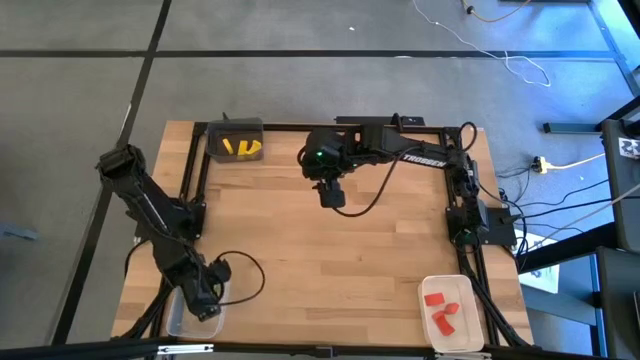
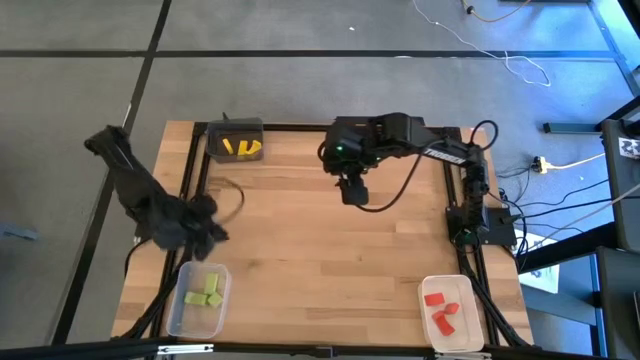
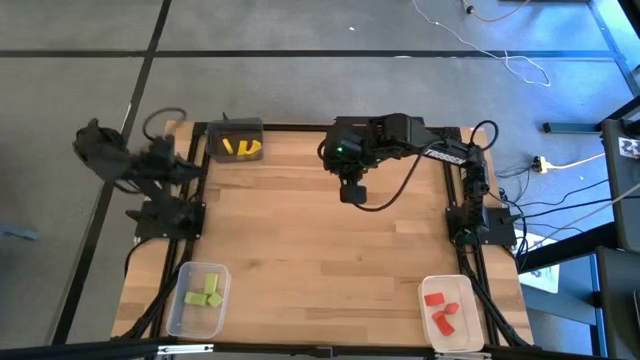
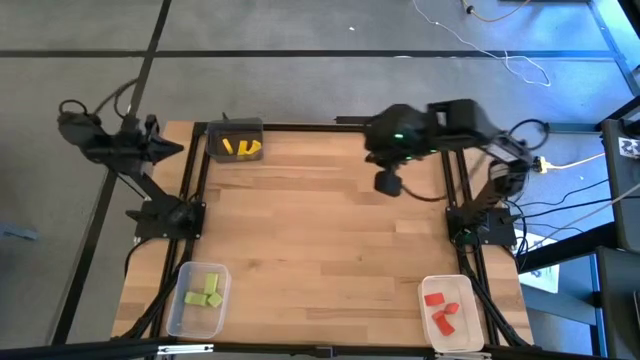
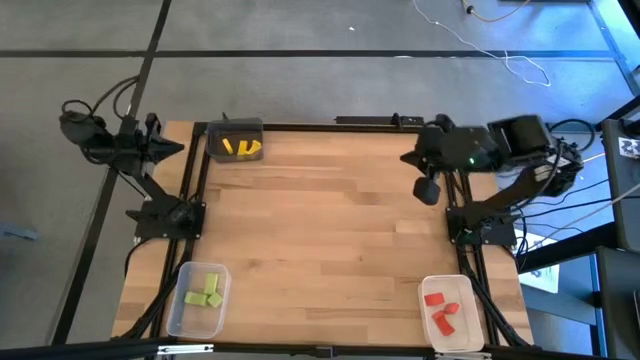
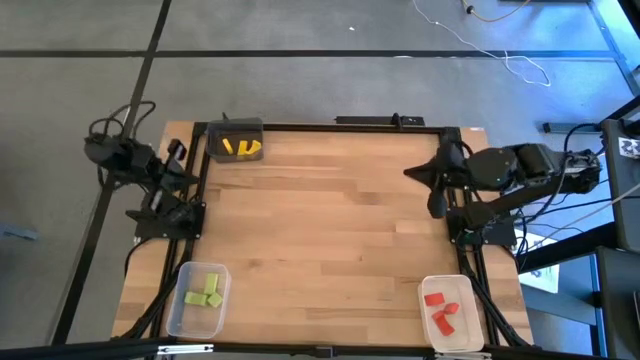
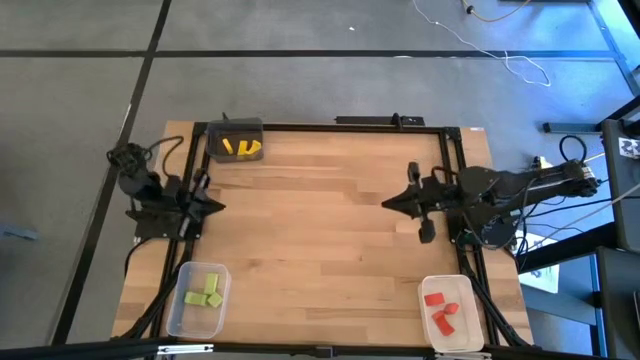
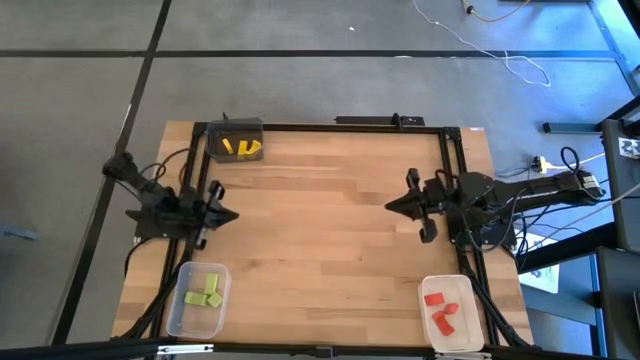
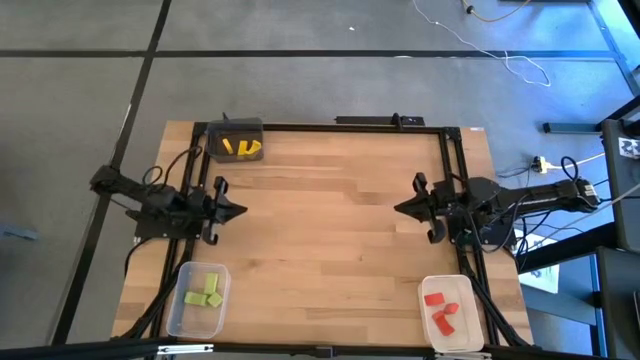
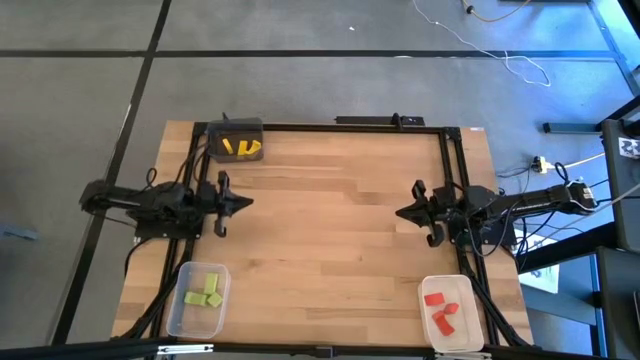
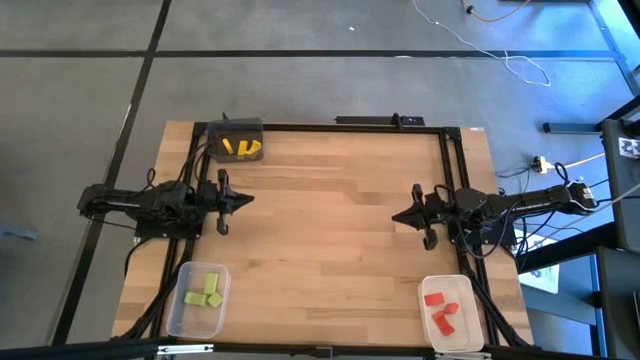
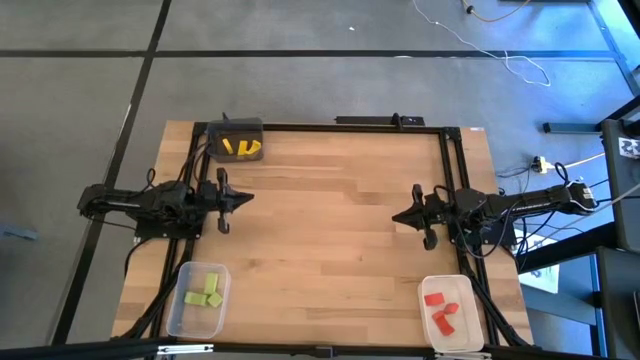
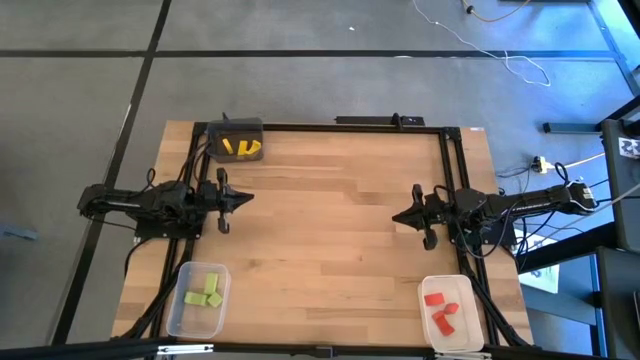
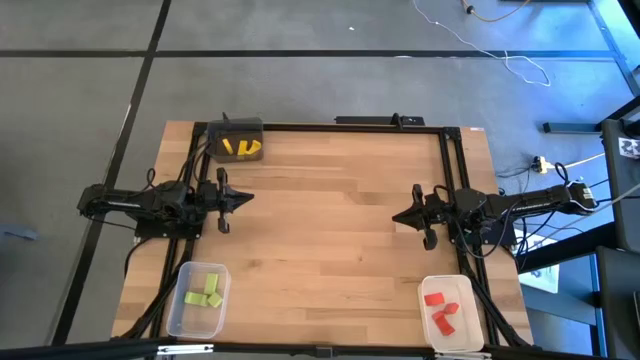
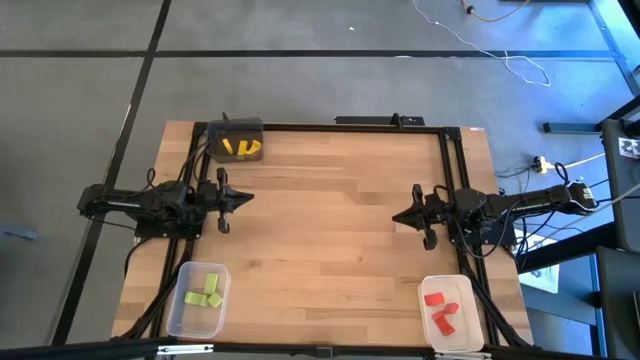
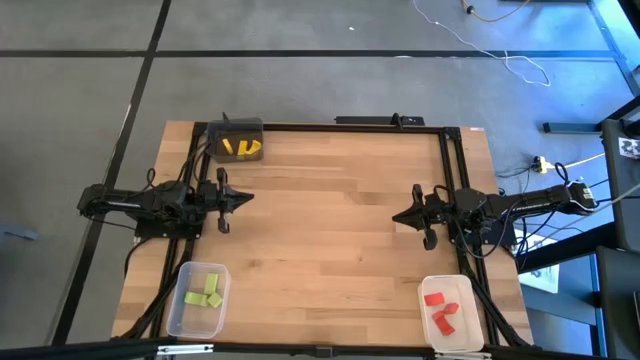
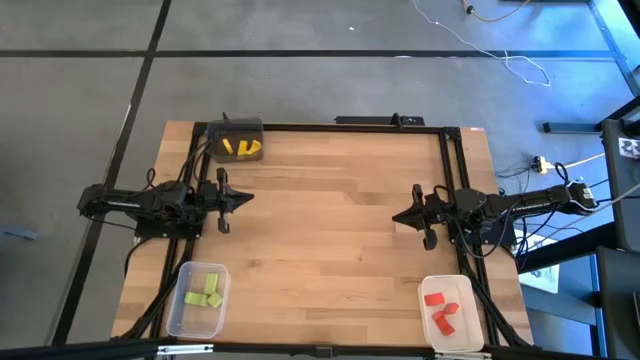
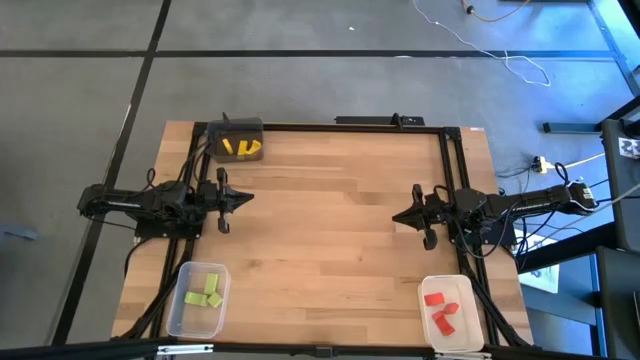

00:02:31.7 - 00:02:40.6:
Task: Sort & place blocks by color
Return to Home Position

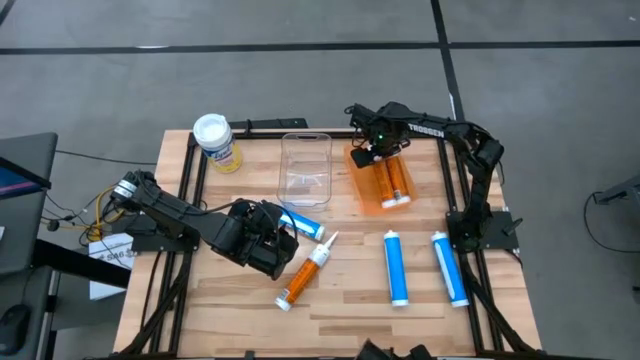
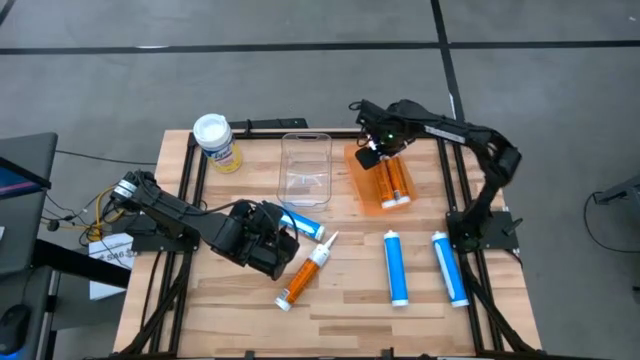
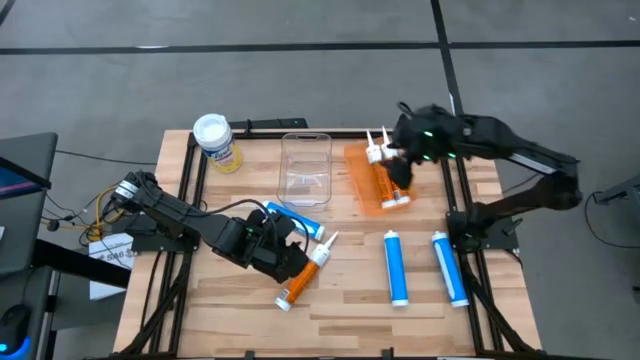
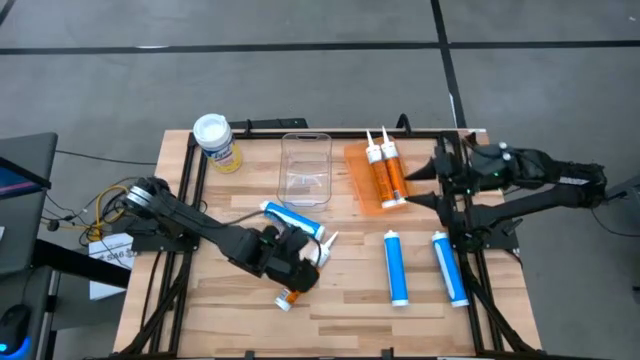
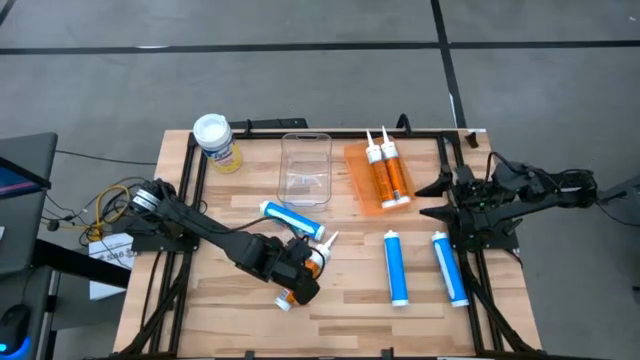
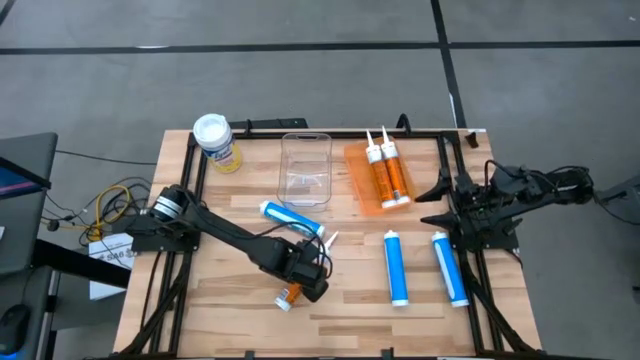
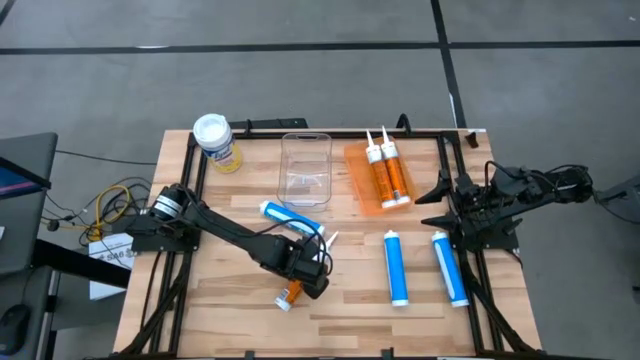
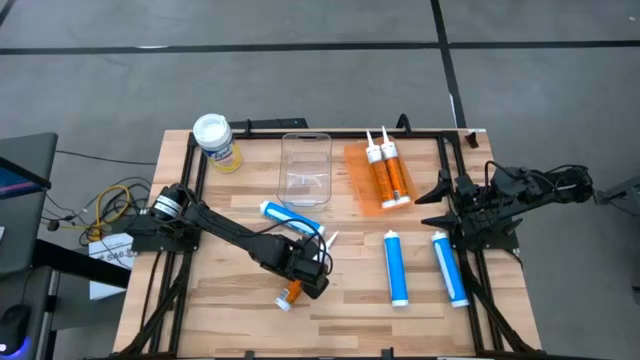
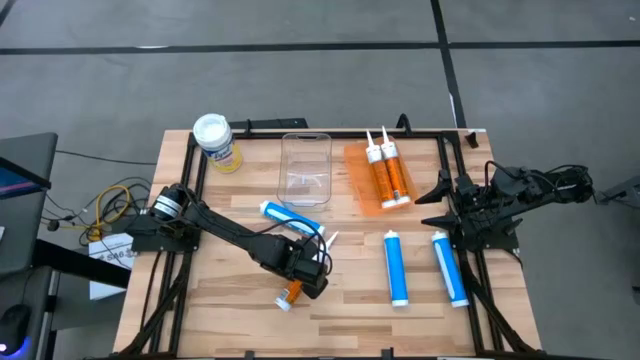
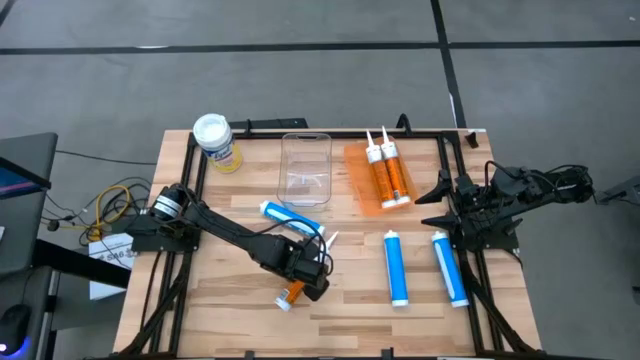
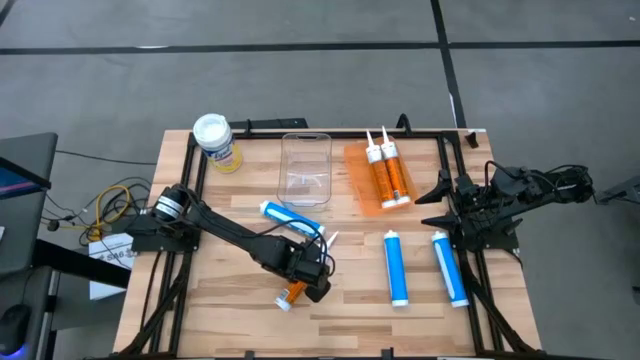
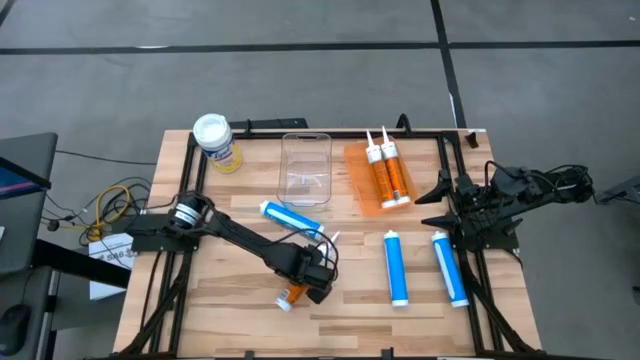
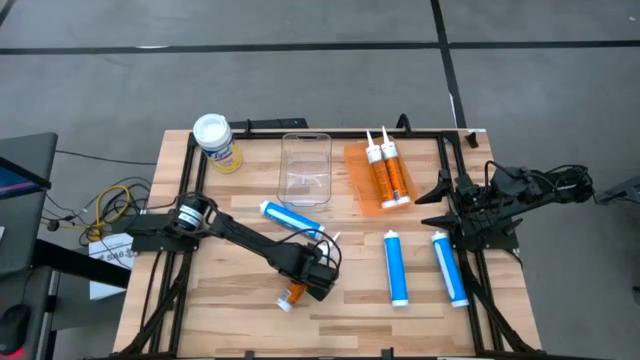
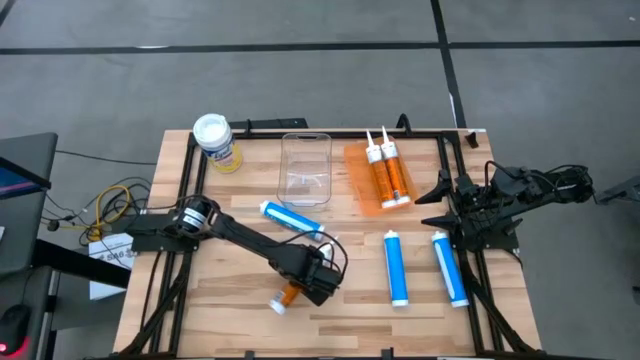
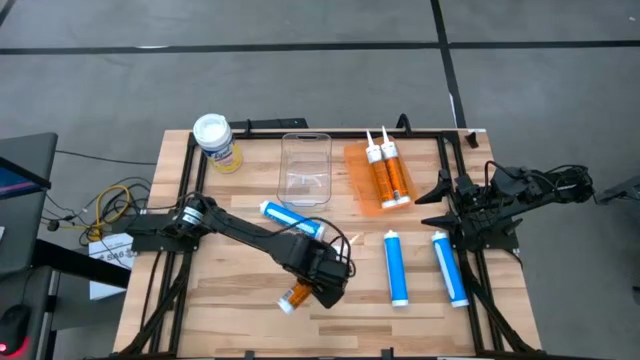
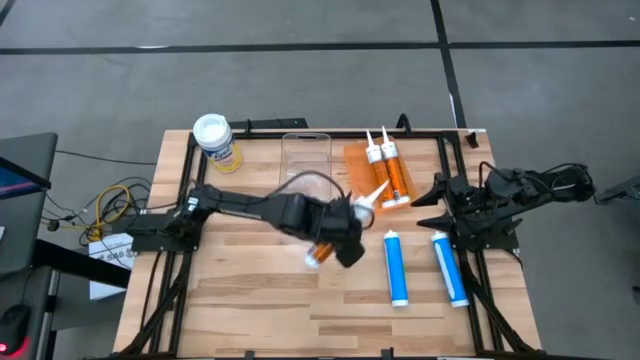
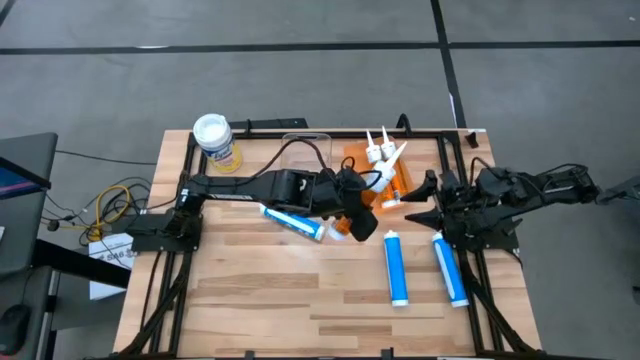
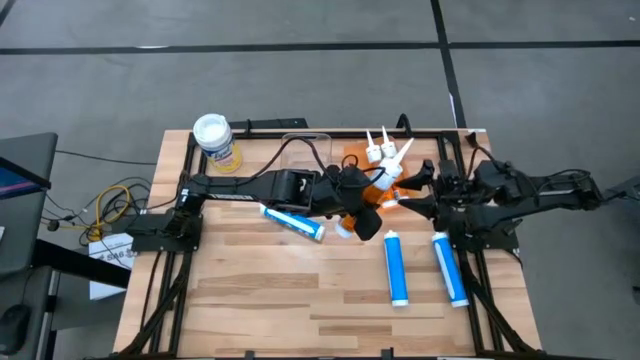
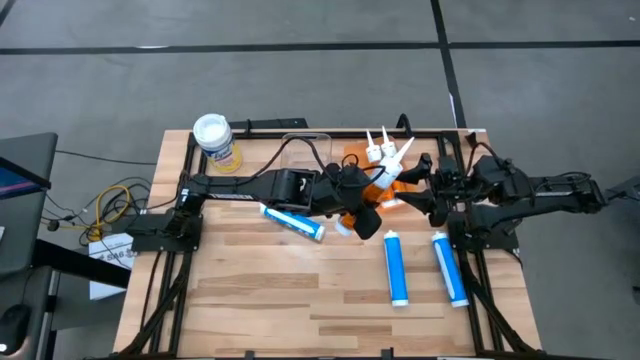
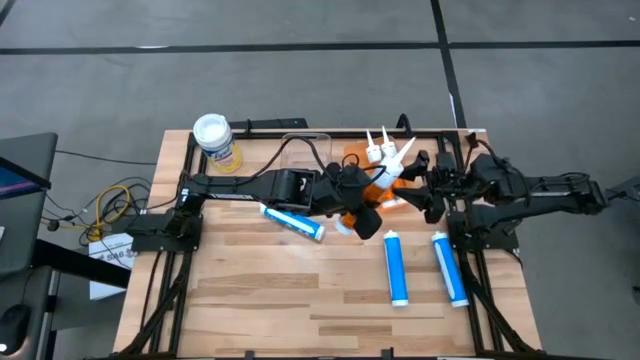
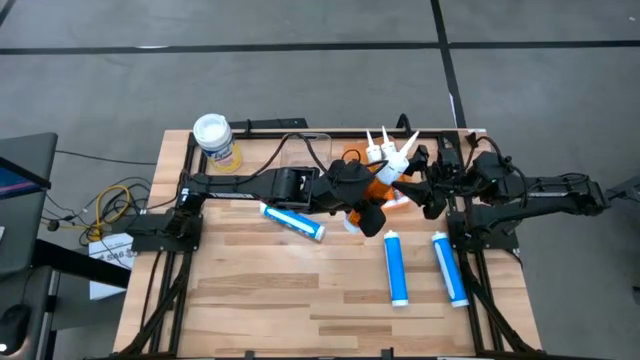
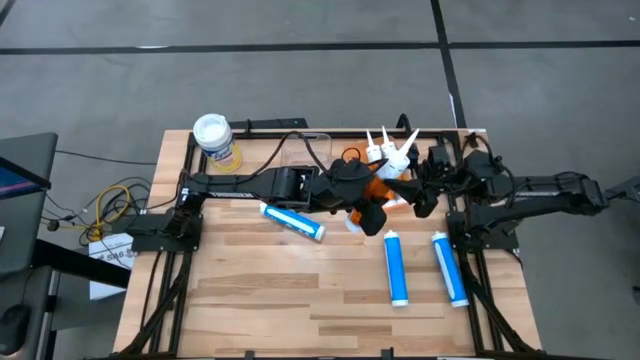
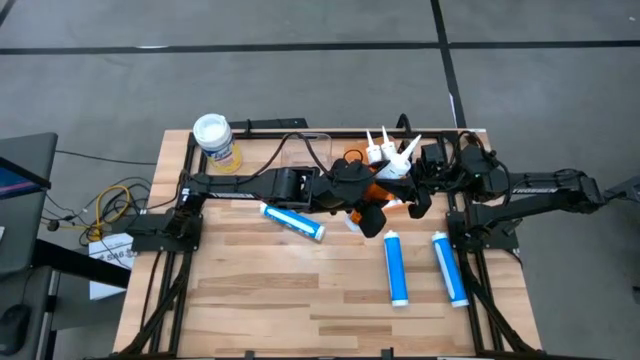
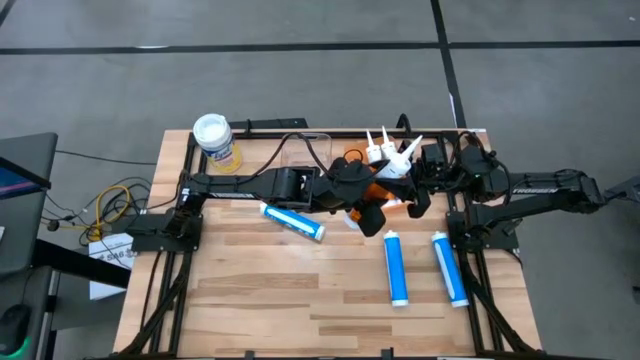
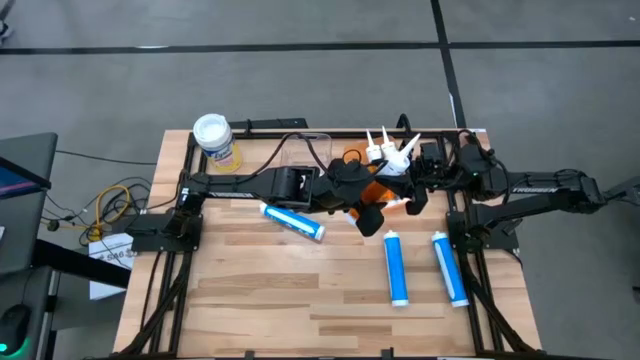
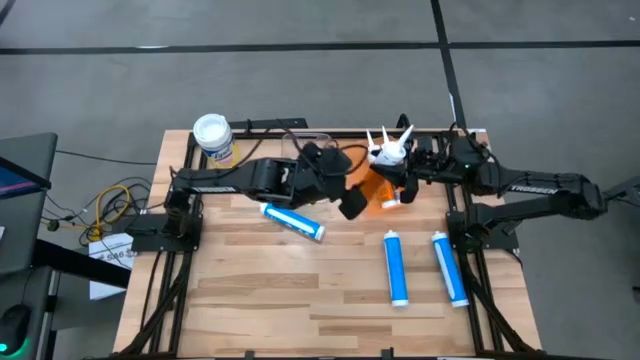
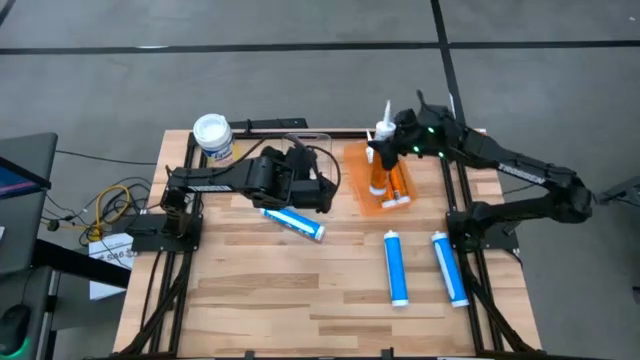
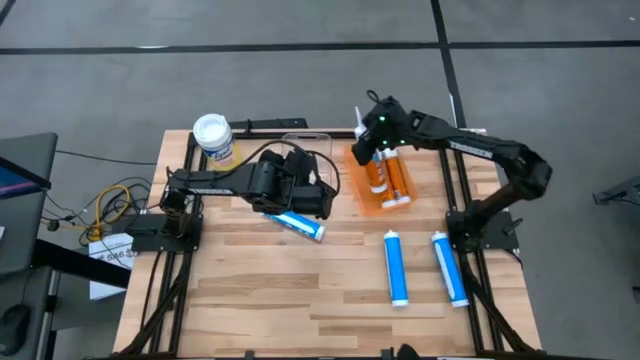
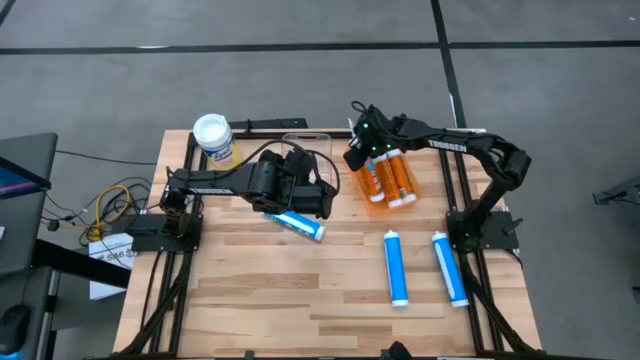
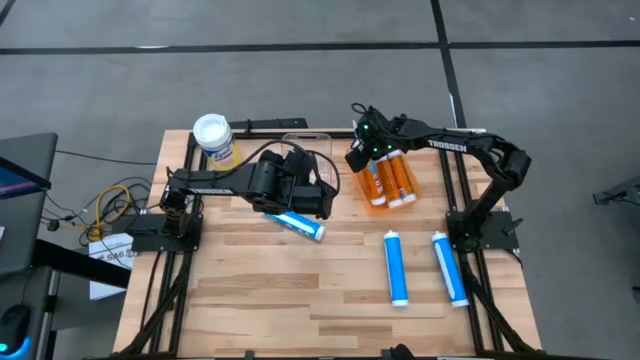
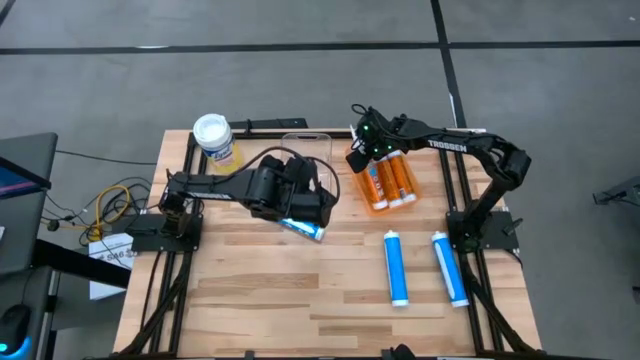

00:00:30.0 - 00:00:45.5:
Task: Pick & place silicon tubes, Sealant and Lysol wipes
Put the orange sealant into the orange bin
